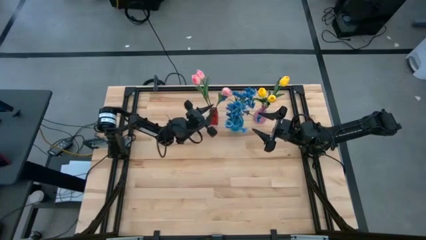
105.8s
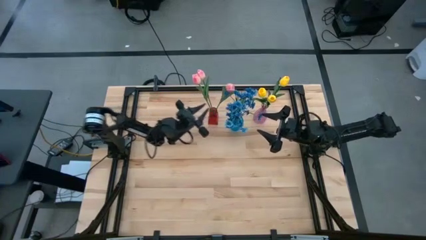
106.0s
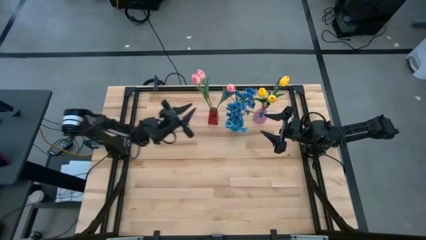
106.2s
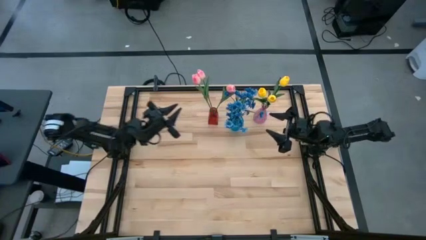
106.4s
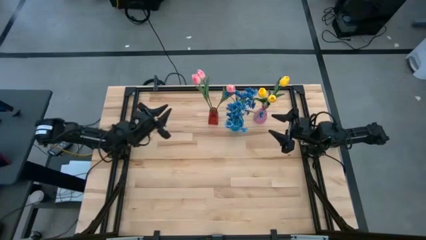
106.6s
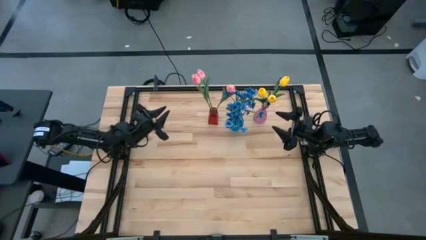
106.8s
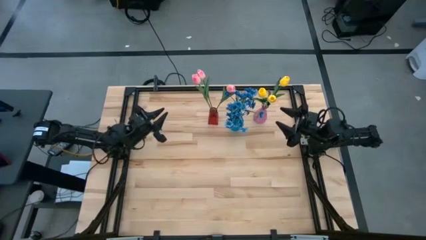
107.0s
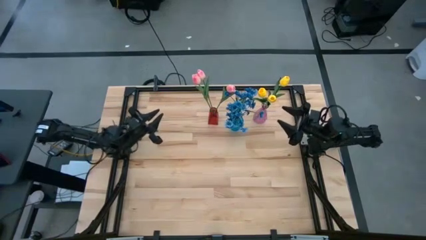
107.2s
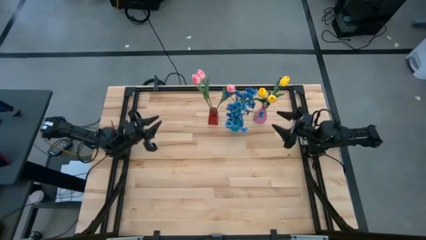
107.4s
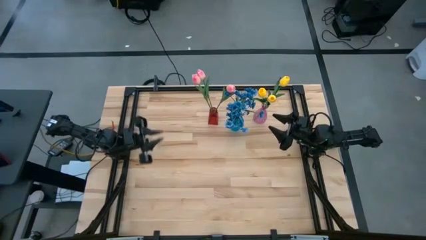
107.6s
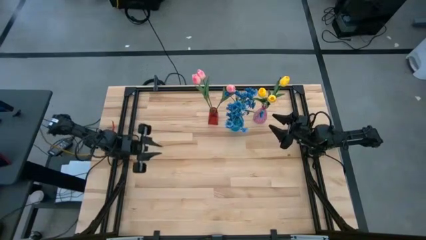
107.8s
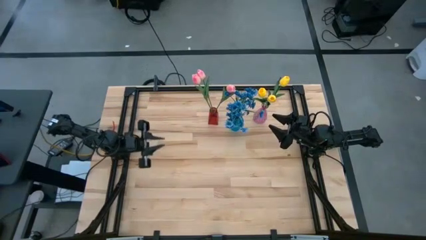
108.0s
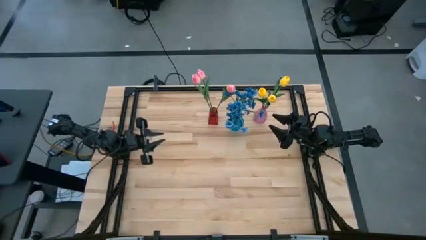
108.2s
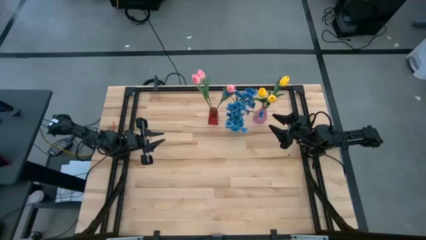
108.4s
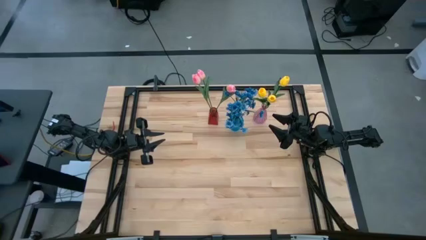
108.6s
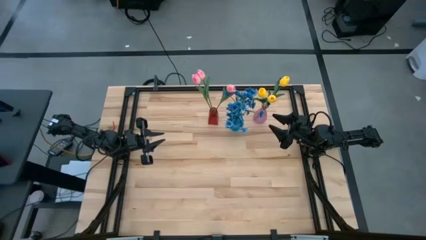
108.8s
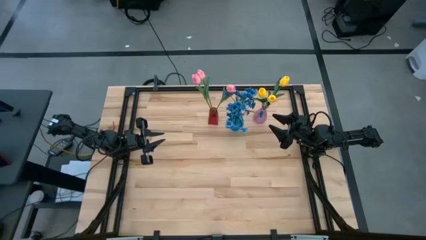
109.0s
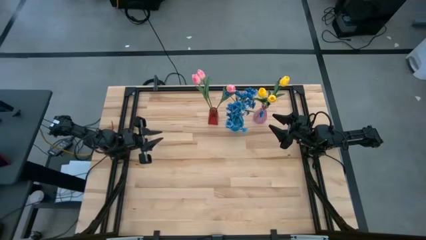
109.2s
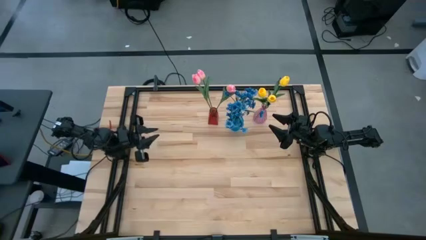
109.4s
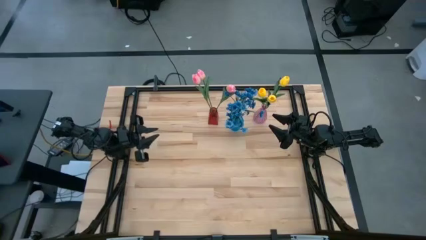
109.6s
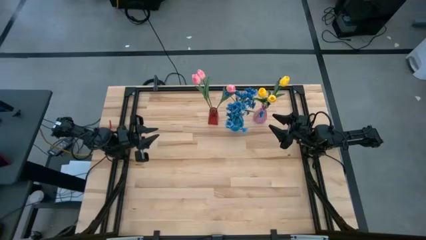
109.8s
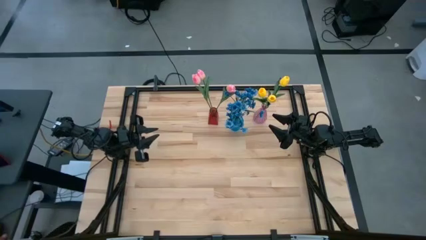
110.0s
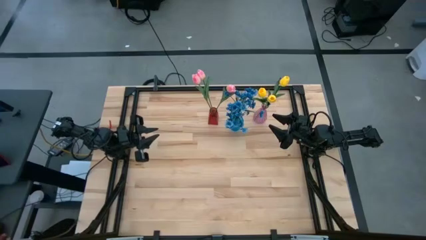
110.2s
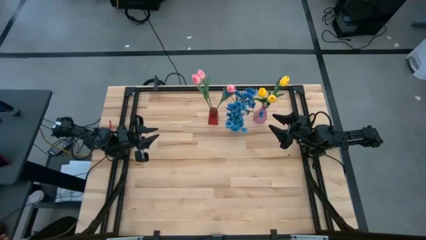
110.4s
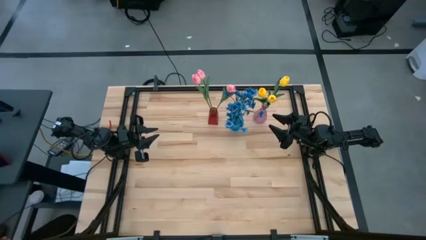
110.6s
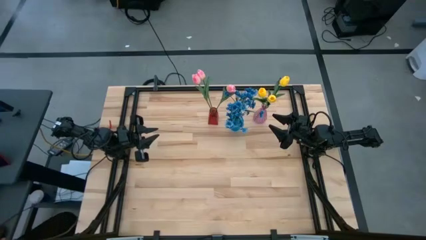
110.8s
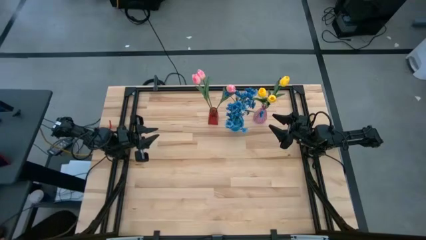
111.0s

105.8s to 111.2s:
Task: Sort flowers into vase by color
Return to Home Position

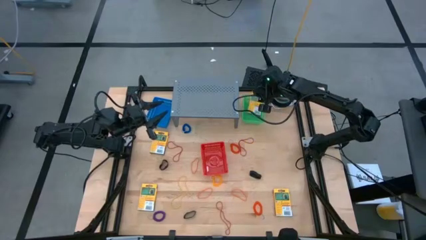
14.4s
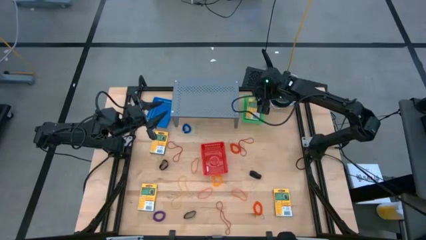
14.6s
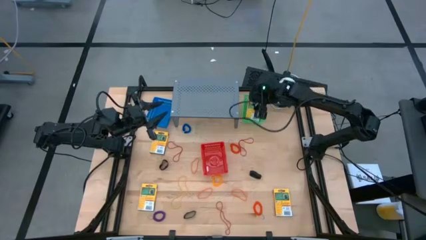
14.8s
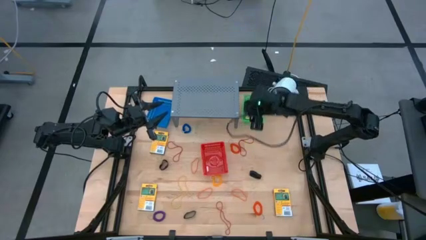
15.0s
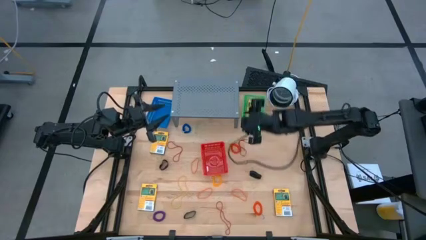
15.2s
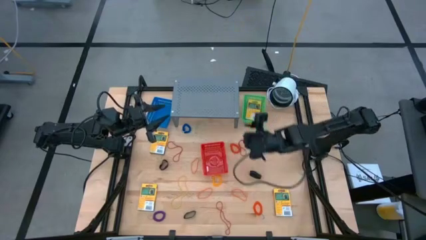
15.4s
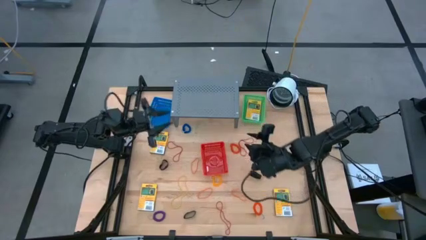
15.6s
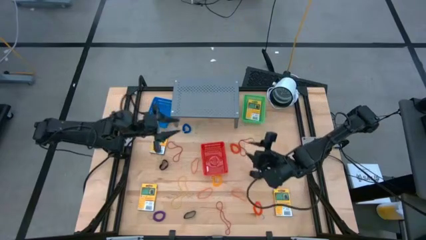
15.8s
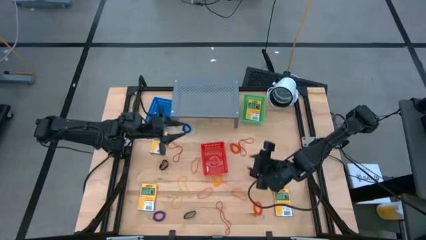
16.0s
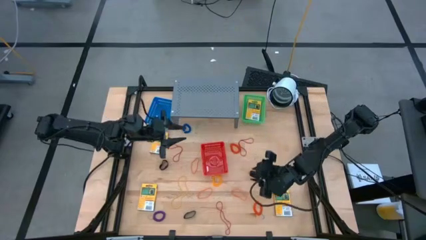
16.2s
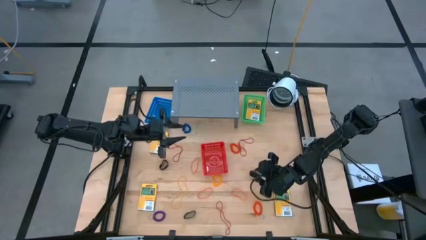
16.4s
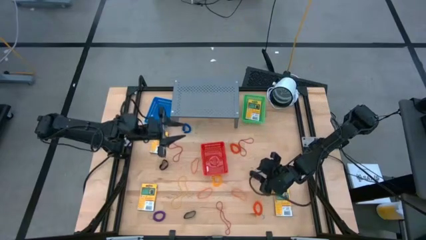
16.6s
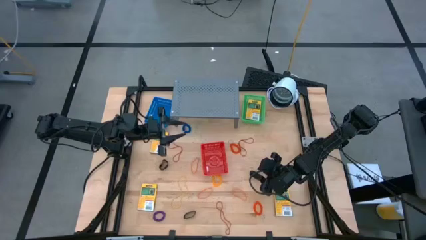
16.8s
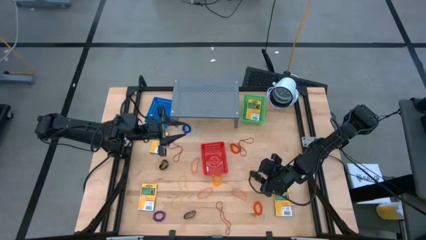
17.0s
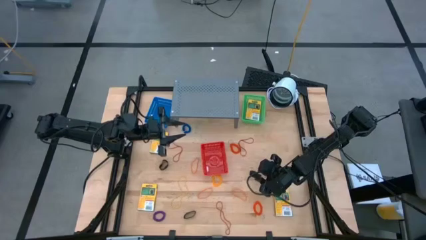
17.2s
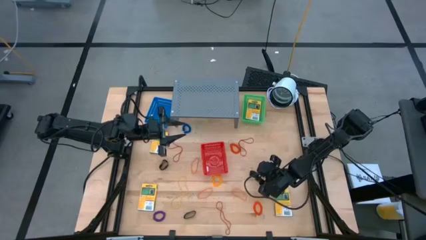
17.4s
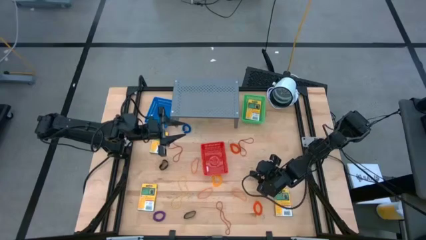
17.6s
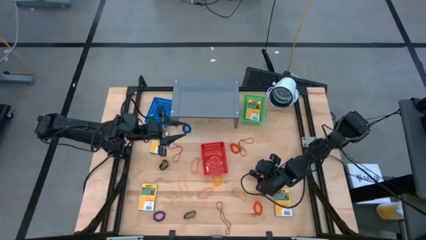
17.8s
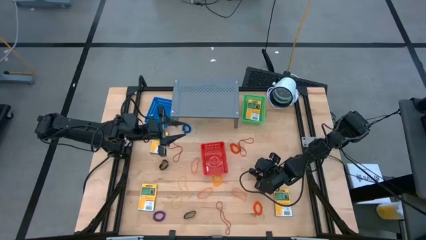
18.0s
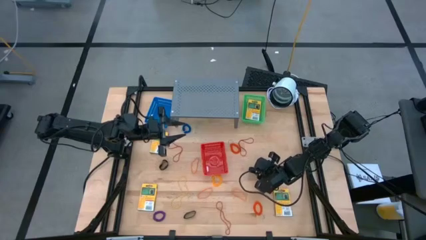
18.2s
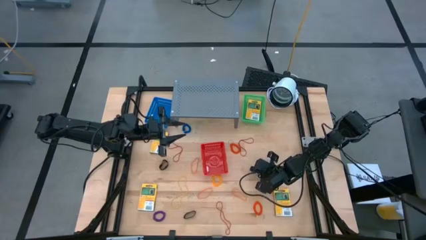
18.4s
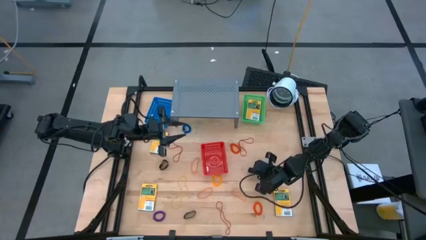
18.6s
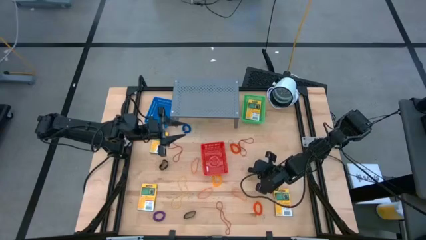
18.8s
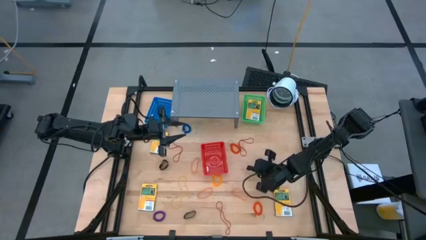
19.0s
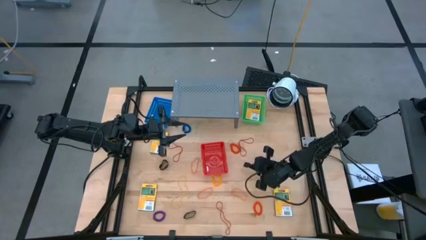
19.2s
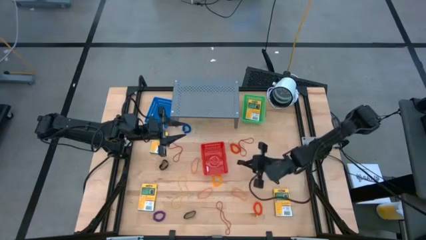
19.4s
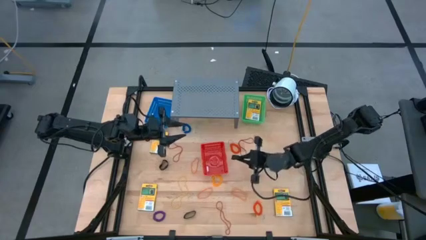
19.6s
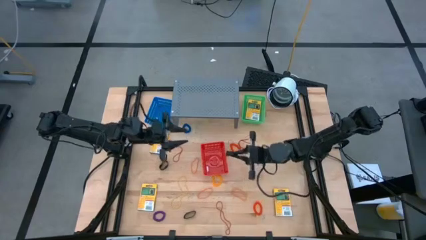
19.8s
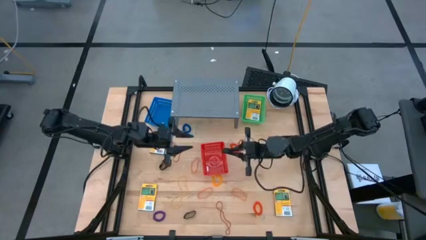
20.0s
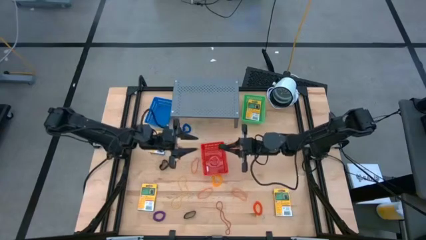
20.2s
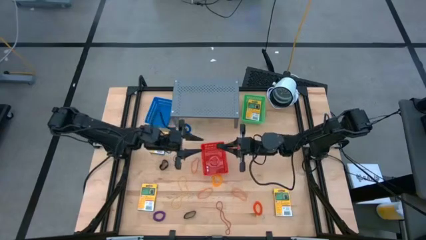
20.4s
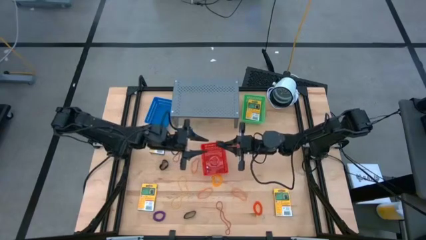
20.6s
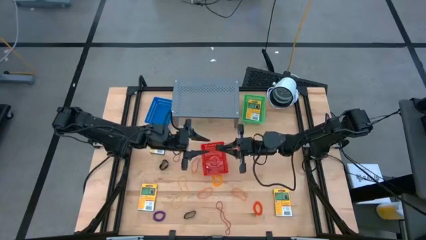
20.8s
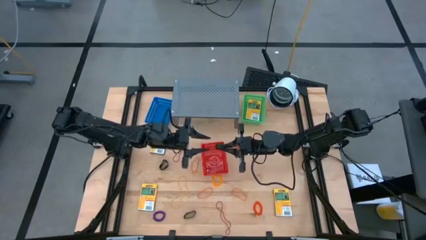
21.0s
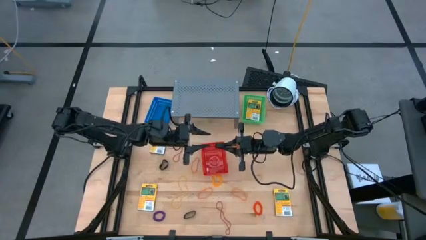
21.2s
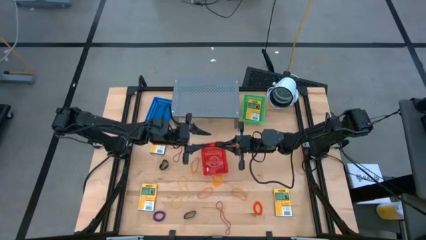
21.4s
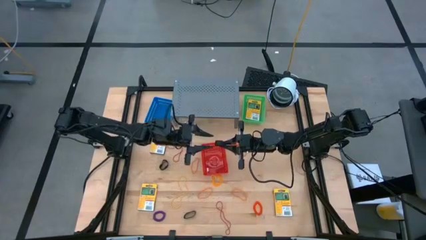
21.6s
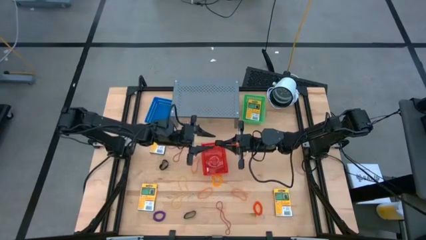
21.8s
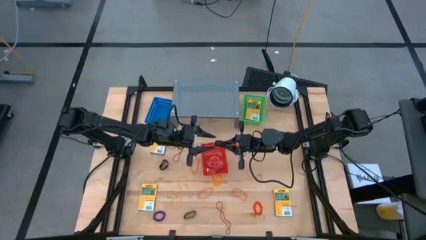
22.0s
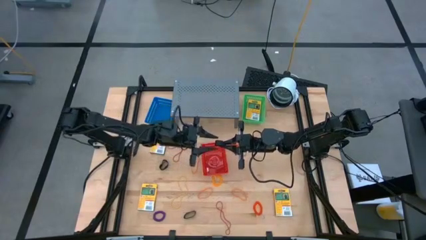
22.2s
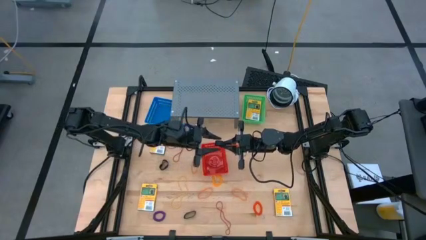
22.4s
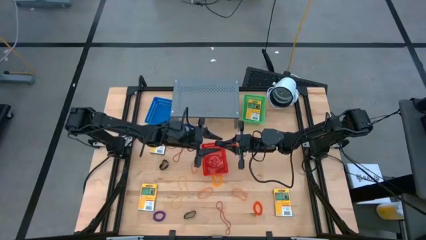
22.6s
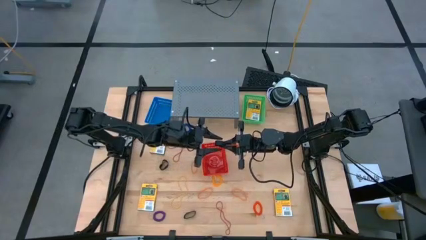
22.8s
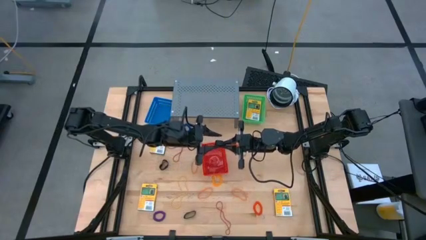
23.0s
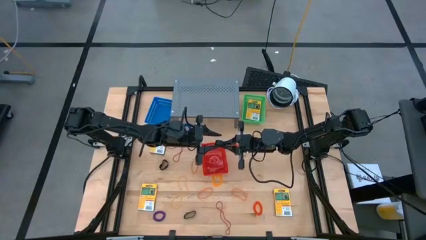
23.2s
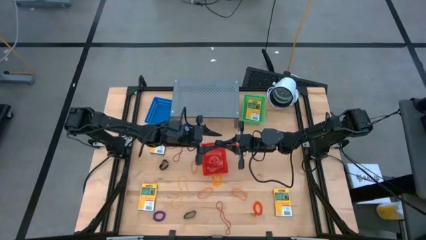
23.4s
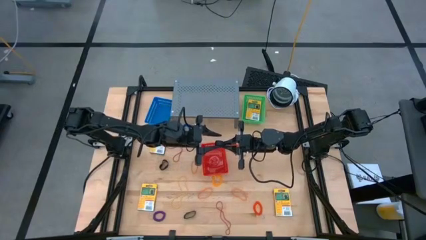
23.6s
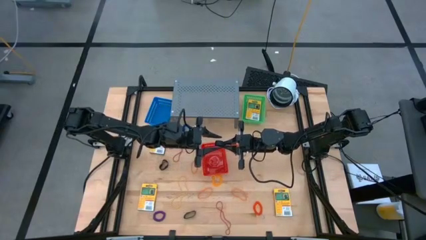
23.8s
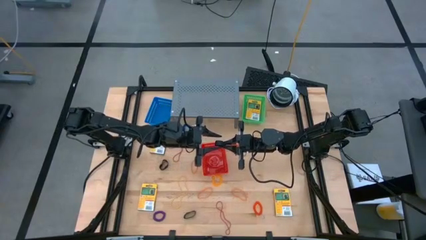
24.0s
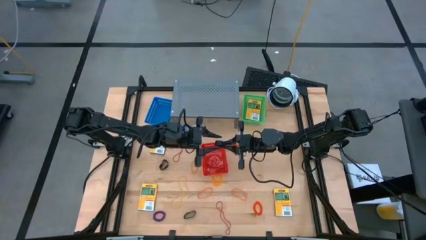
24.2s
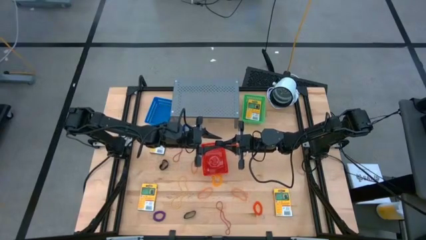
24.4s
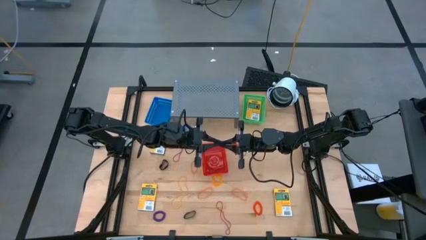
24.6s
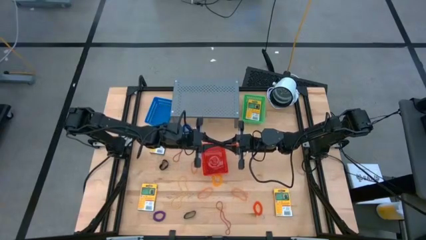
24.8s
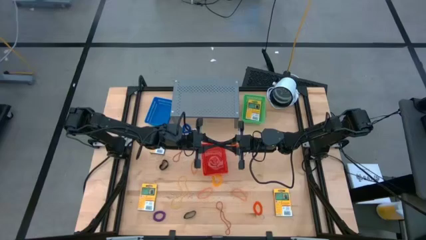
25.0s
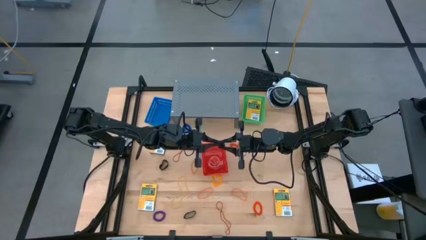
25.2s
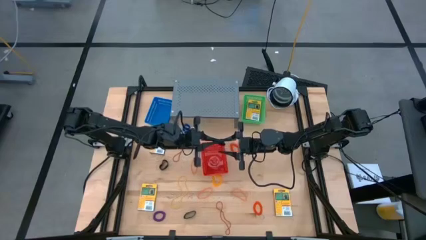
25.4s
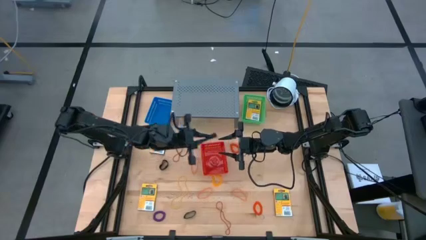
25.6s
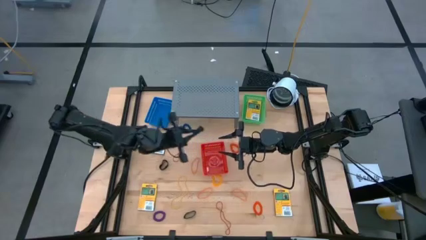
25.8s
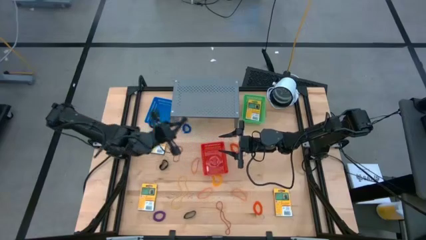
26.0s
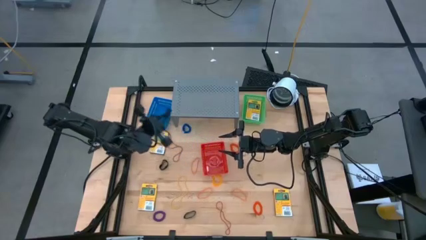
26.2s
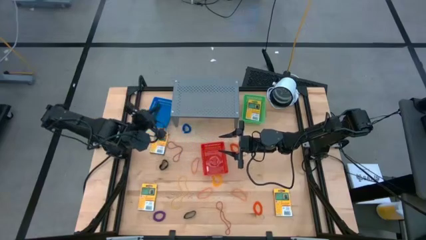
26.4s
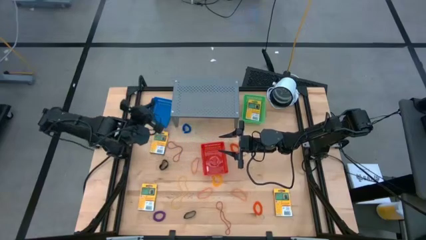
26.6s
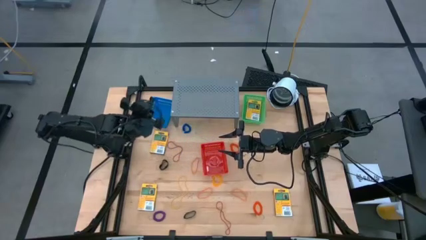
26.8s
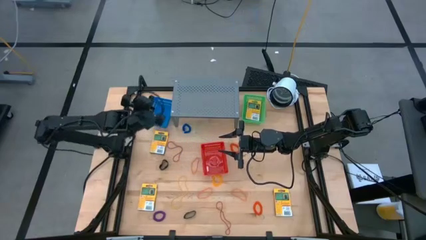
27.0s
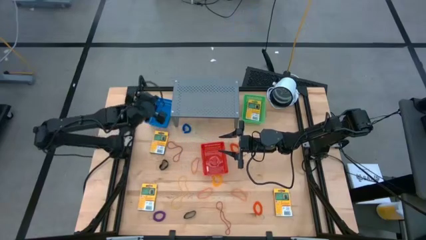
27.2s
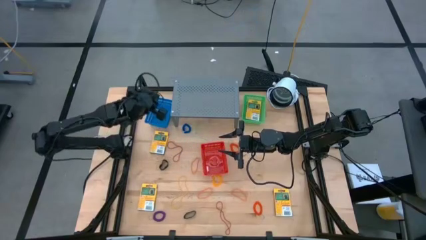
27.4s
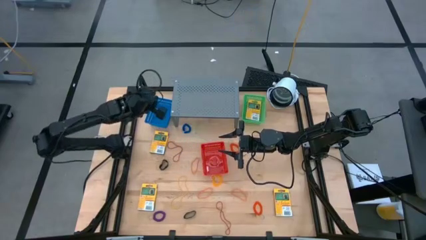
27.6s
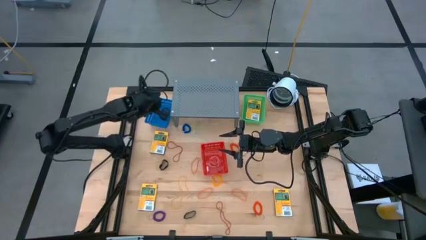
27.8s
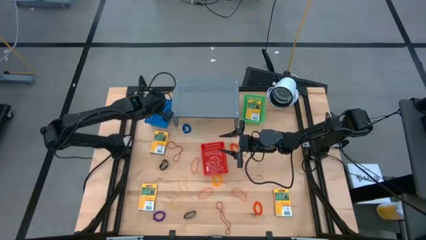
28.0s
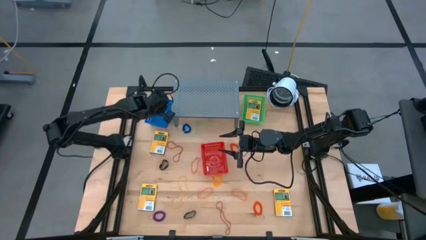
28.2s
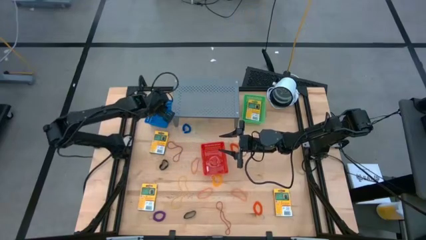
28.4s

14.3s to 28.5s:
Task: Pick & Place Office Desk Supplies
Put the middle right black rubber band into the blue basket
